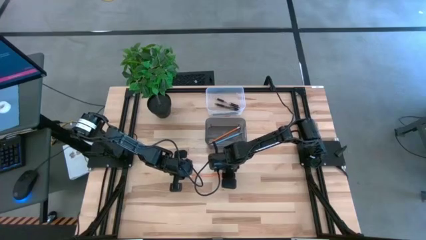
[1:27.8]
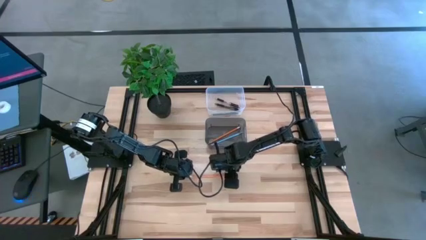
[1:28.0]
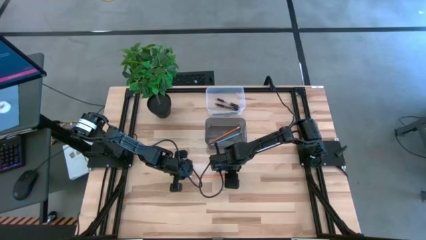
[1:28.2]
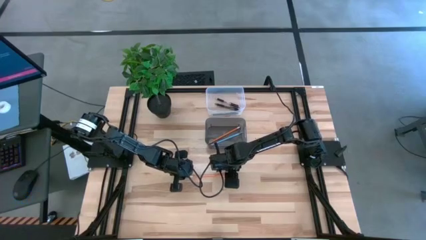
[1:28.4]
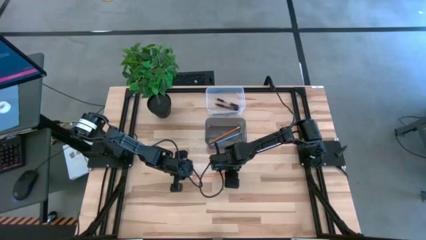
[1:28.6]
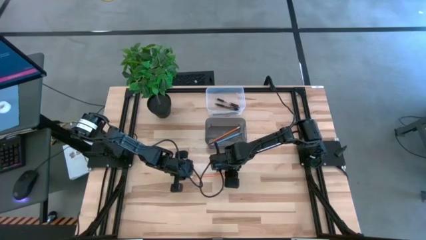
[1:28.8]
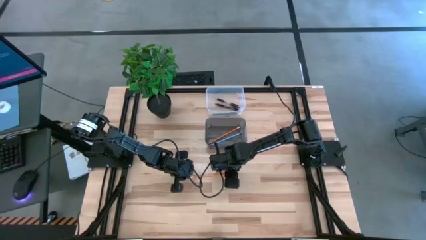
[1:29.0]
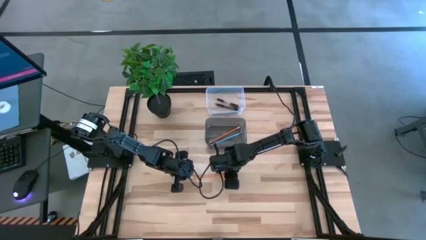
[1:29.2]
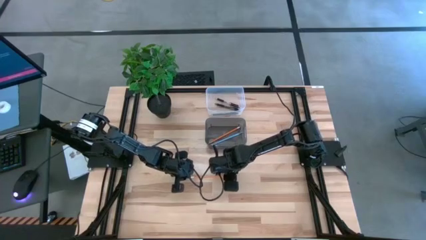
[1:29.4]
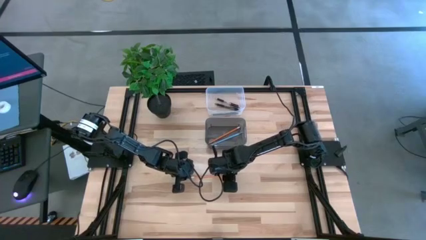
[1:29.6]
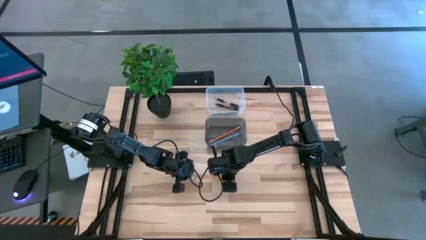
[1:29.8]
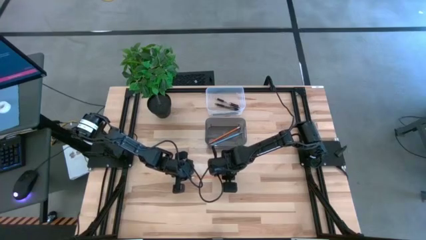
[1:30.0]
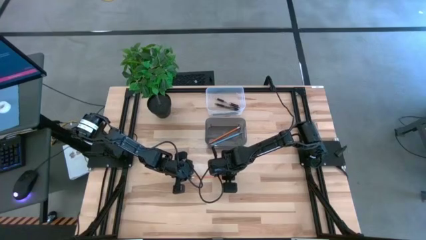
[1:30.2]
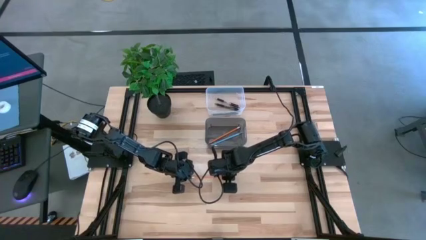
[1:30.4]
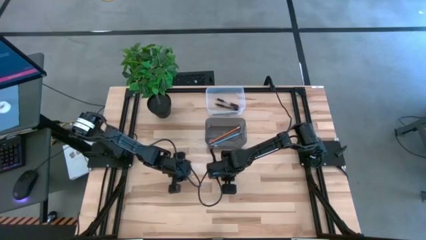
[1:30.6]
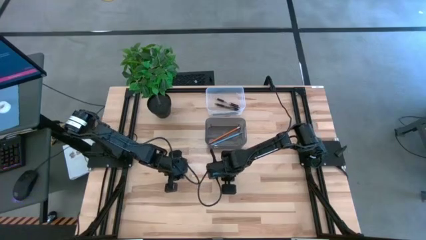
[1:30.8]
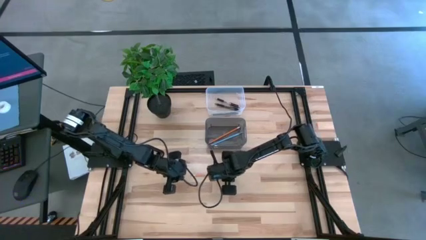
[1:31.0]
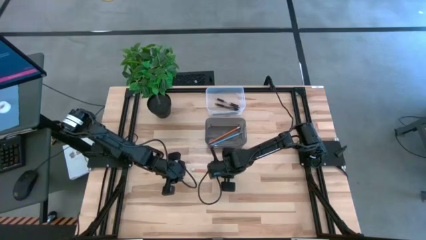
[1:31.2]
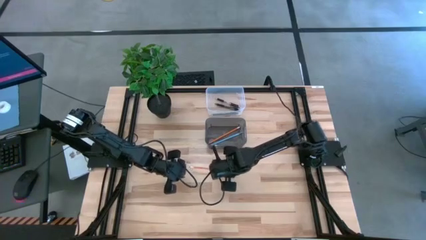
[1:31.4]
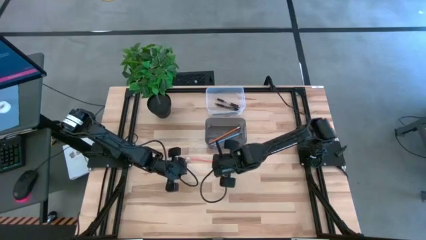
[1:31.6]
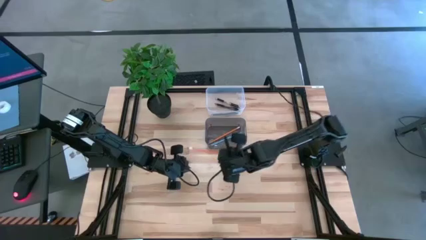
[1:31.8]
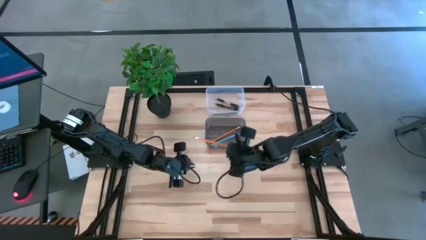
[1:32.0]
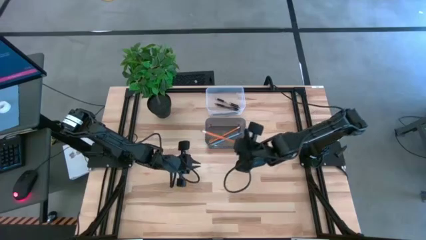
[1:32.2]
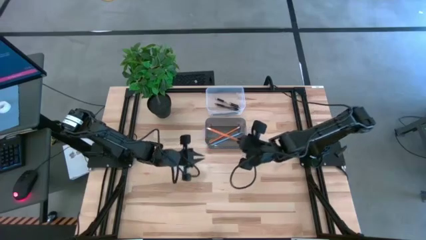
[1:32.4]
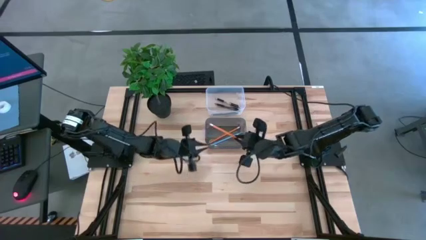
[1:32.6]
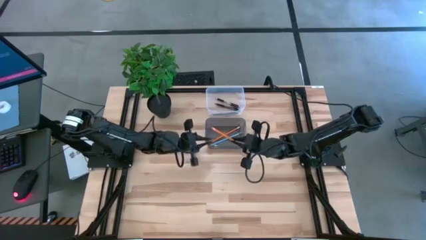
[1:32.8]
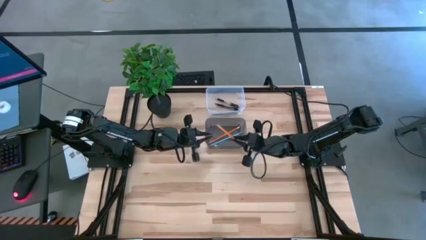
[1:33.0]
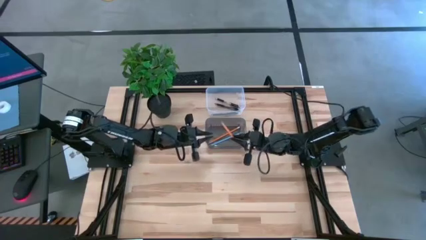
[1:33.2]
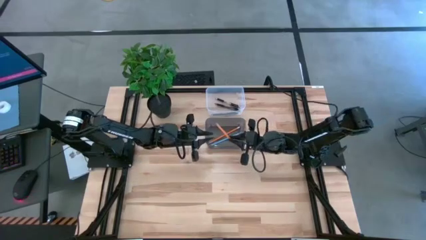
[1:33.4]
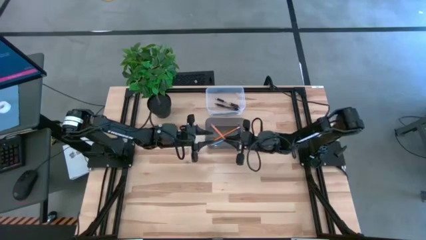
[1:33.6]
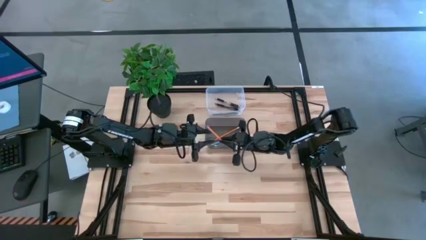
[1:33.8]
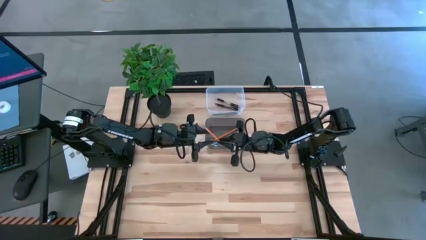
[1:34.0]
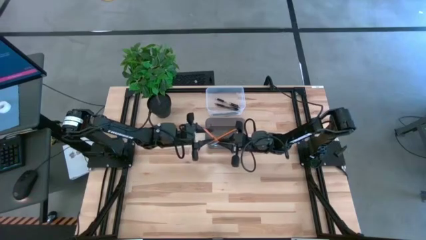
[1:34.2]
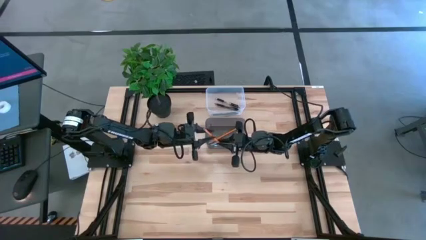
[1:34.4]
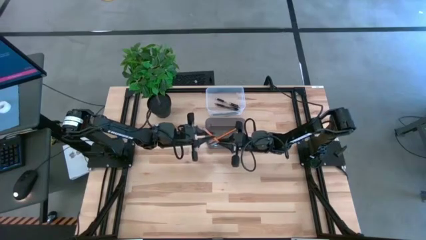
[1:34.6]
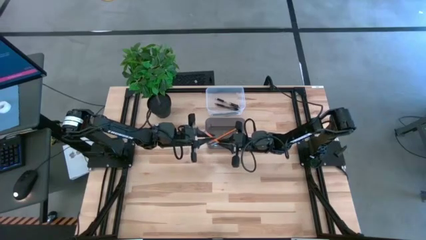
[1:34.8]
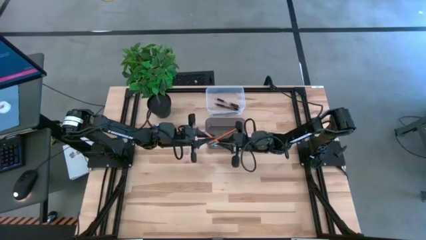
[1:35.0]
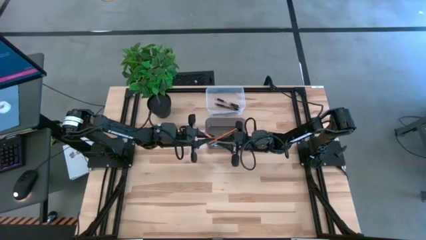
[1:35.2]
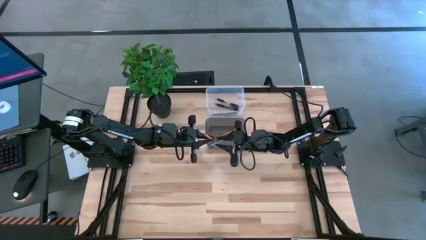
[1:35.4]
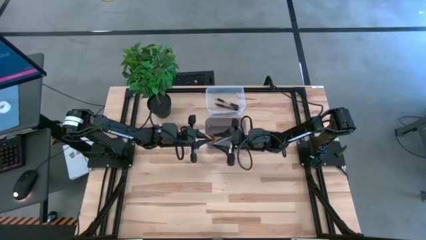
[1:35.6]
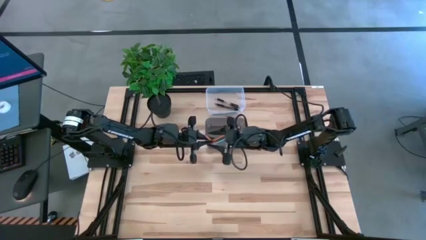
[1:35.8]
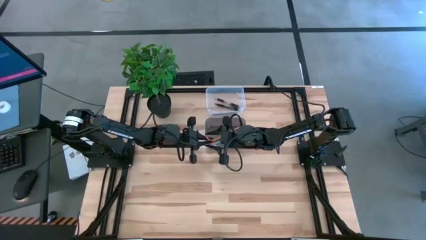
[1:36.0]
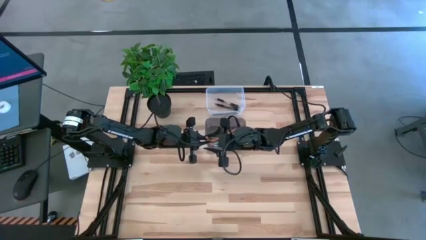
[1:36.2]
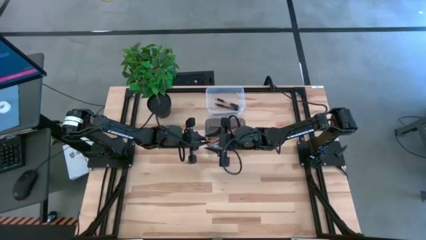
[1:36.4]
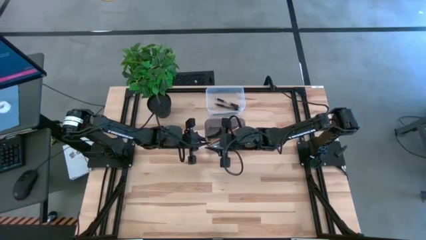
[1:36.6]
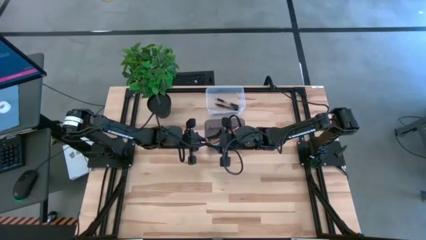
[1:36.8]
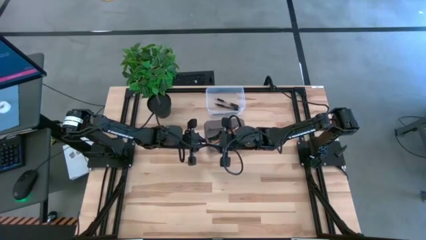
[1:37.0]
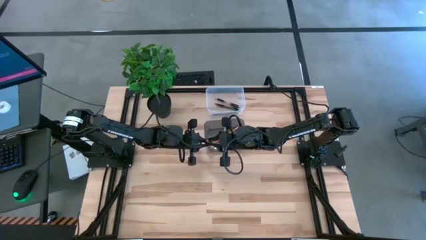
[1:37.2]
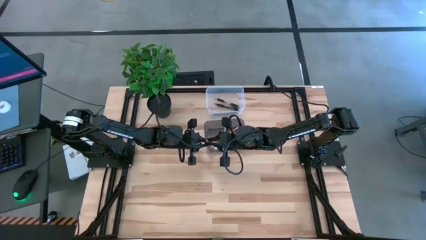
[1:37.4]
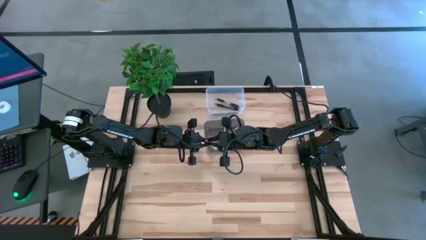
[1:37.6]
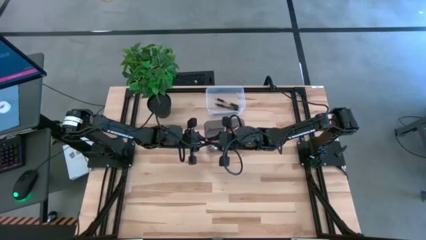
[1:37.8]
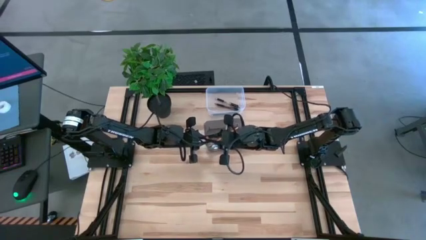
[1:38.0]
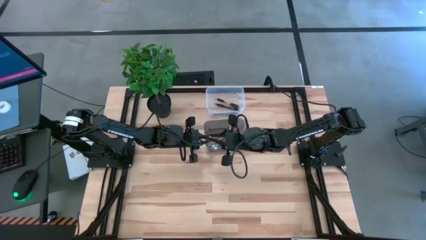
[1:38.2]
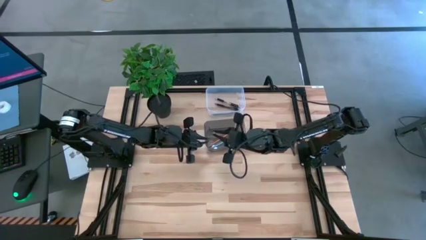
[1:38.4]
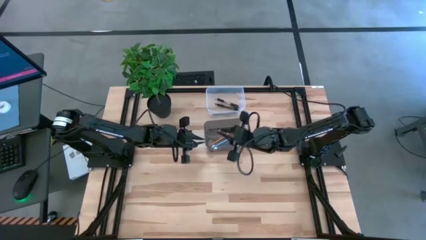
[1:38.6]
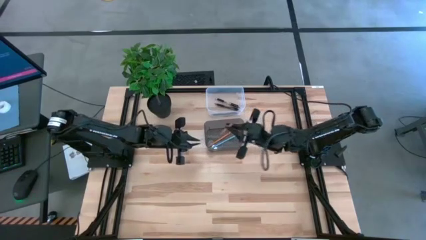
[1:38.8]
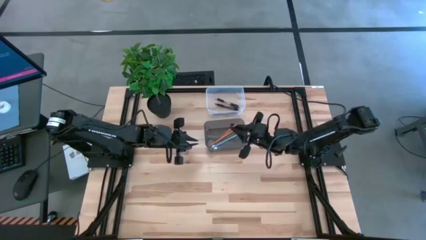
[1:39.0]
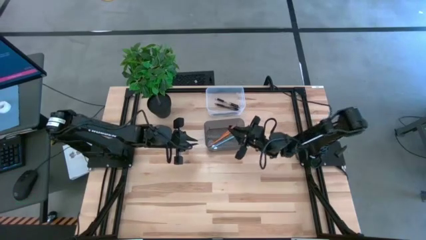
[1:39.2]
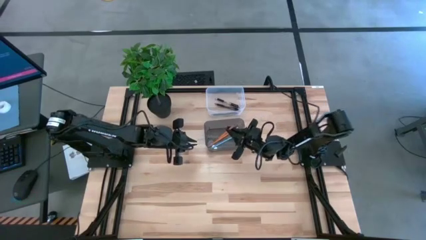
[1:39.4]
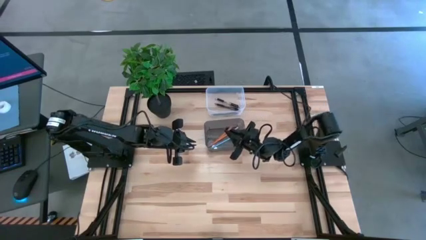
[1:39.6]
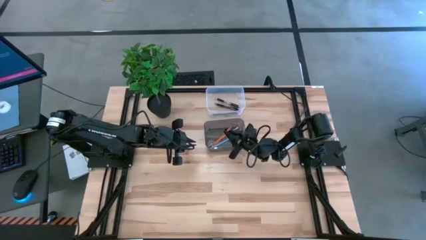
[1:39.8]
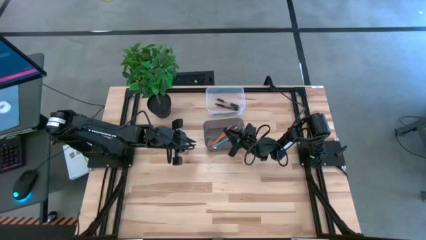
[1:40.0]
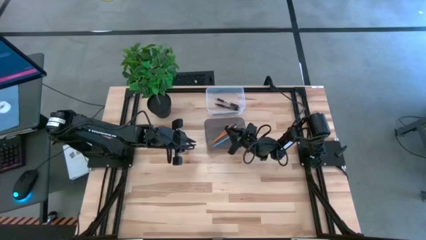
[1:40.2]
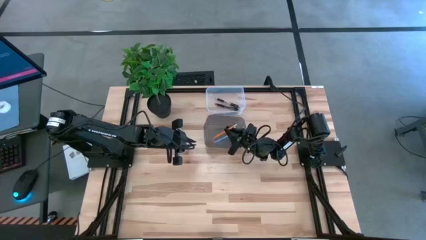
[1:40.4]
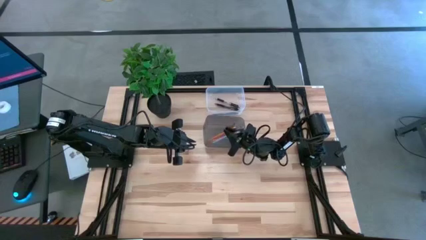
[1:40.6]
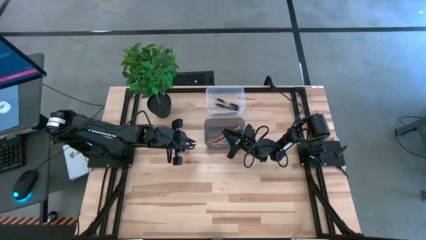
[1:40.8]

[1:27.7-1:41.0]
Task: Sort pens & pencils
Put the orange pencil into the black bin
